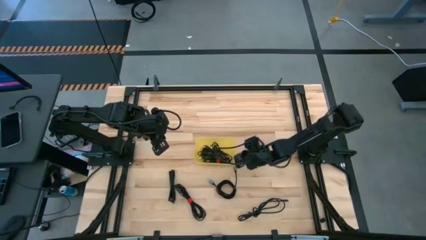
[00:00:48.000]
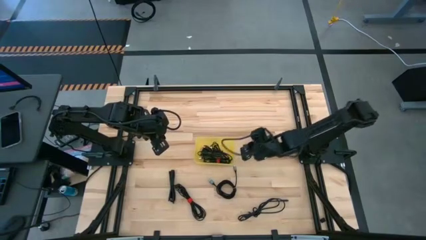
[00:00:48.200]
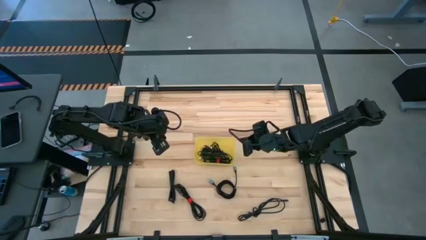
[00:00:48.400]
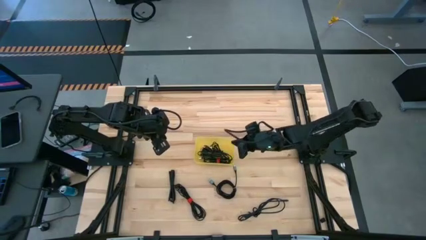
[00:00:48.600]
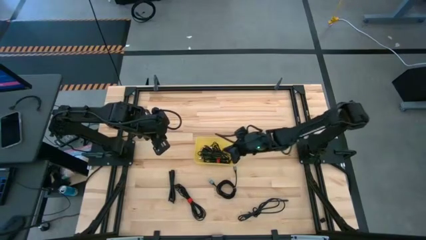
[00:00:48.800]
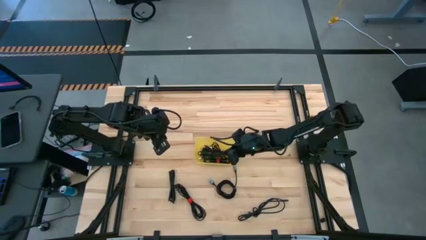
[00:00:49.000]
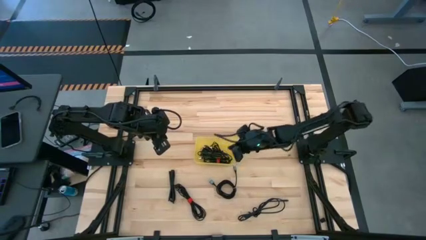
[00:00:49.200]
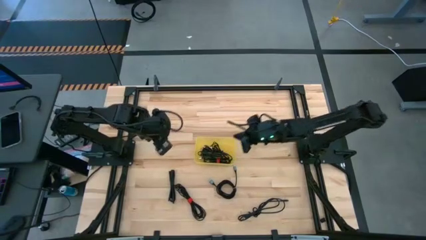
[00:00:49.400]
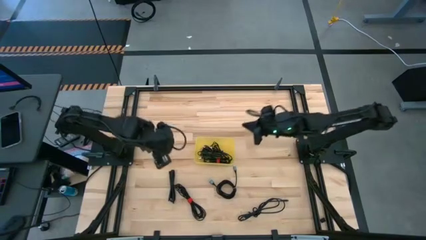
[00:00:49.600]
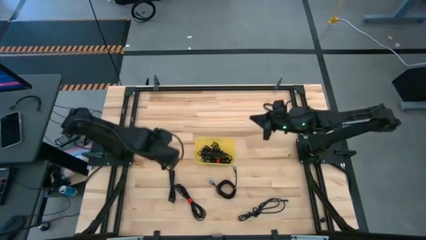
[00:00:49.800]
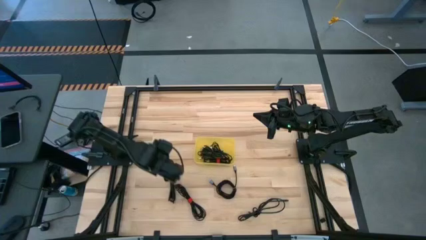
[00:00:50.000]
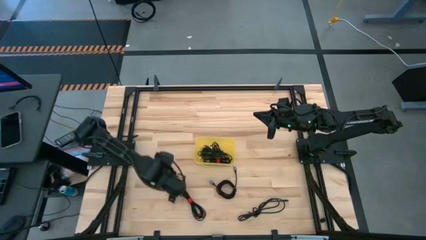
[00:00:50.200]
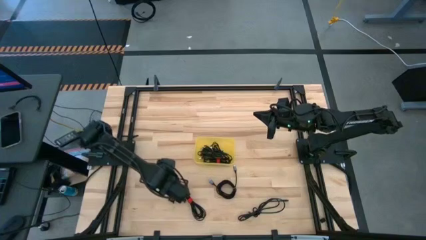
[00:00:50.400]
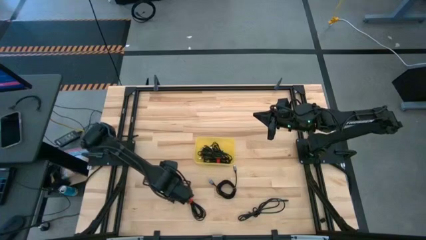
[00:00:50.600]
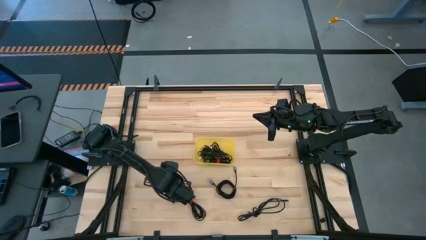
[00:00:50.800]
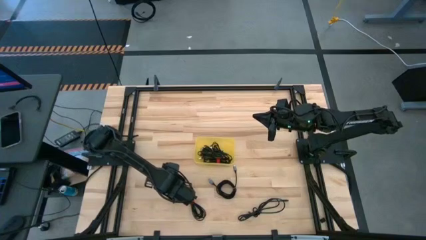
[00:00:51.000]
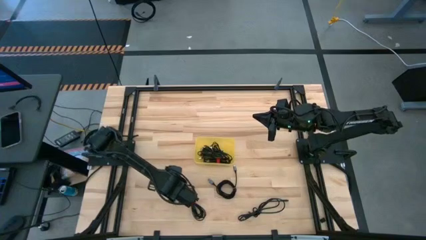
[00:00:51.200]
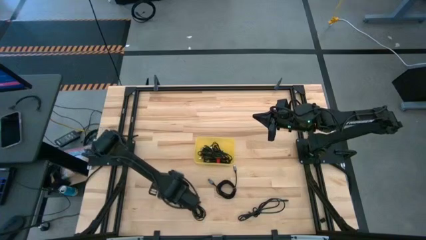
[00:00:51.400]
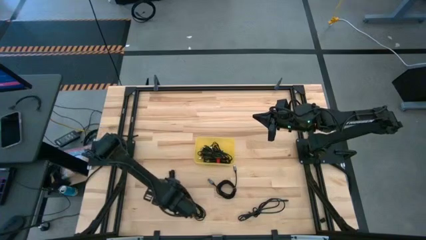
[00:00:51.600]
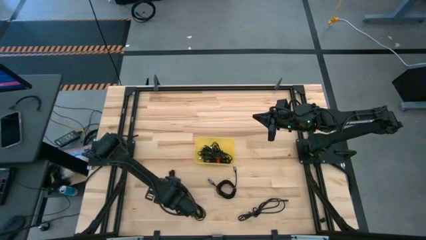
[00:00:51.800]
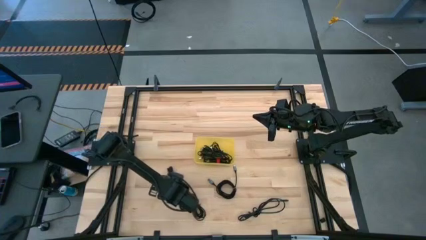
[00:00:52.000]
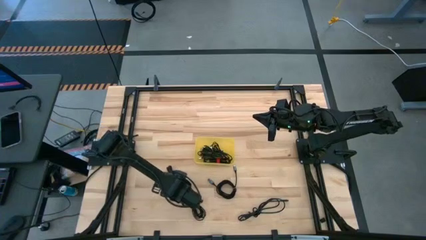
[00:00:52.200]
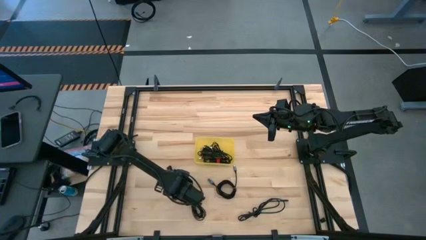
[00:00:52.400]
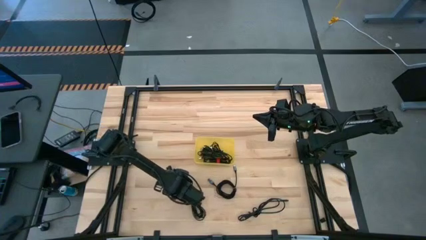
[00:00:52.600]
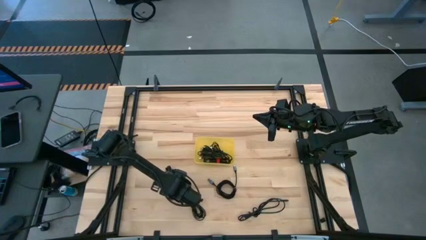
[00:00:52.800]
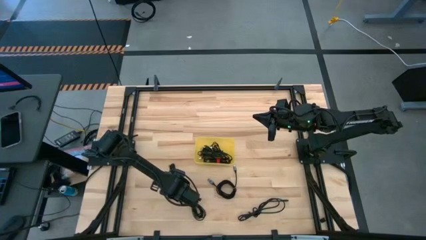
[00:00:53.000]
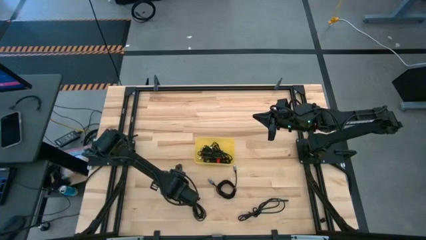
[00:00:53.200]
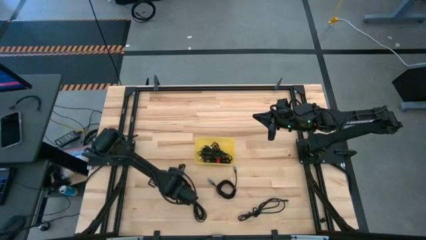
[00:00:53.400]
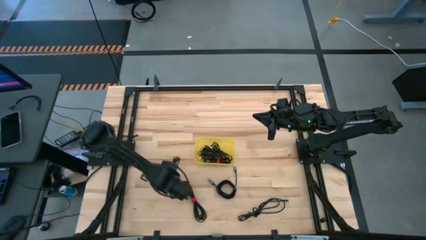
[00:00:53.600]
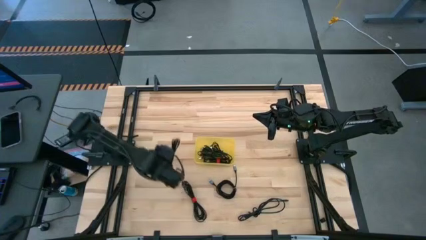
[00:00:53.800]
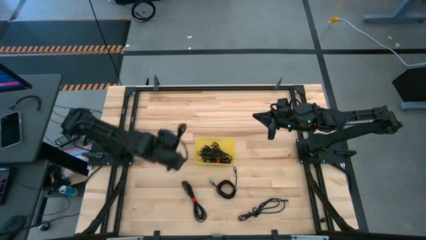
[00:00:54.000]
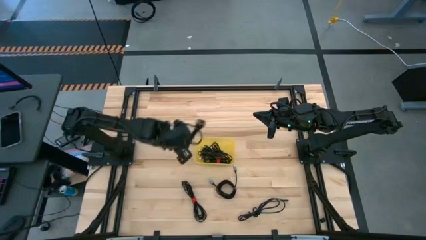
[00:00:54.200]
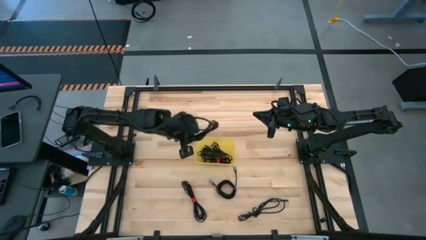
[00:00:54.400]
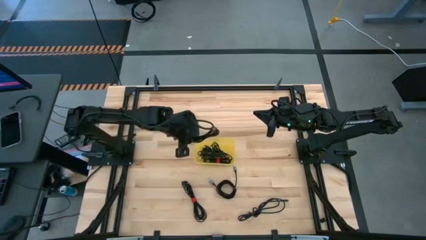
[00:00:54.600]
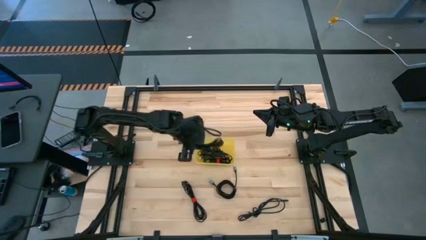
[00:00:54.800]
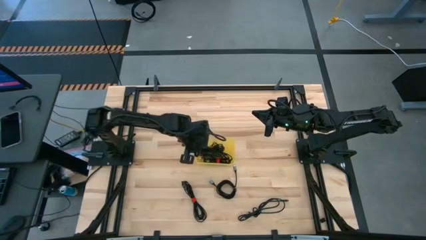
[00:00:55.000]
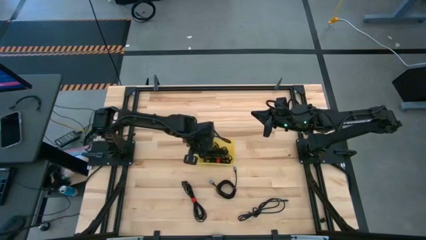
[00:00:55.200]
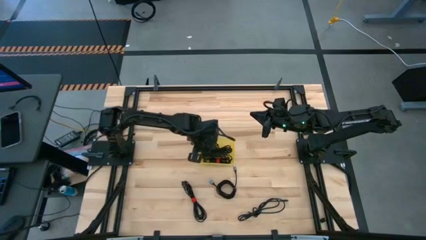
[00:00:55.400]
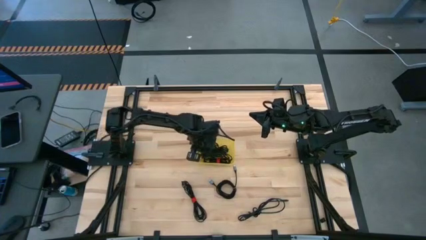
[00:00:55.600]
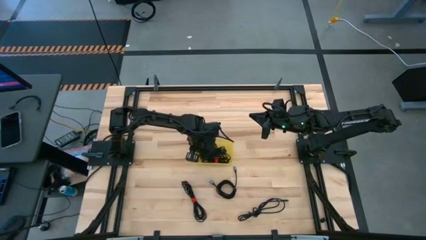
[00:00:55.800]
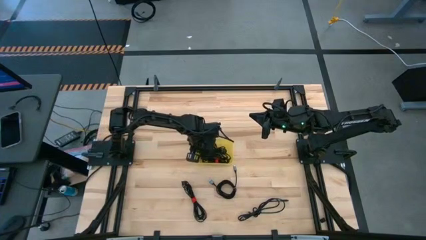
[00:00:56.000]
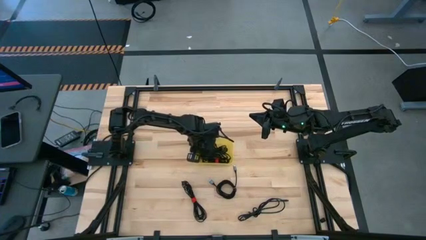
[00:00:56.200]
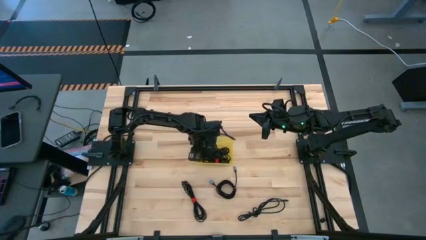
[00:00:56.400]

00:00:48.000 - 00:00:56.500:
Task: Pick and place USB-C Cables
Put the black charger cable into the yellow bin

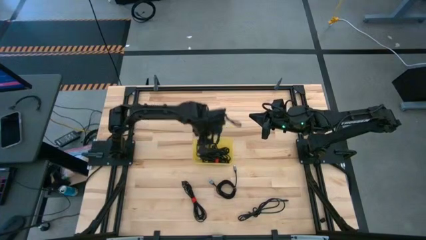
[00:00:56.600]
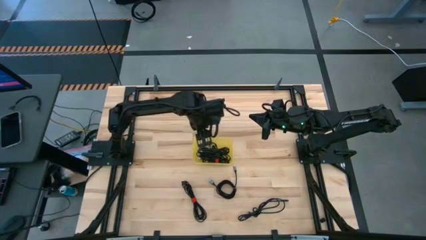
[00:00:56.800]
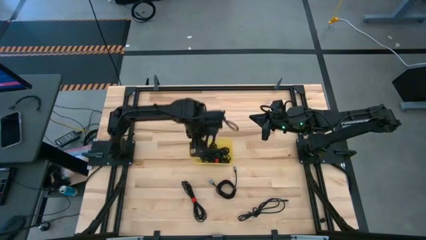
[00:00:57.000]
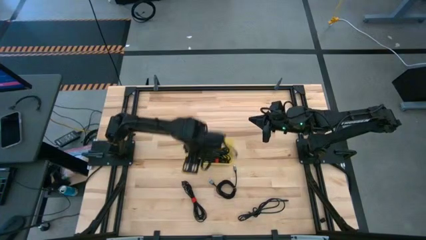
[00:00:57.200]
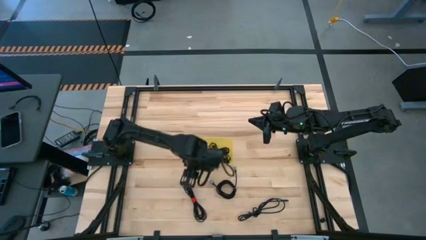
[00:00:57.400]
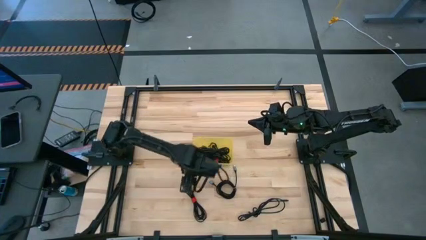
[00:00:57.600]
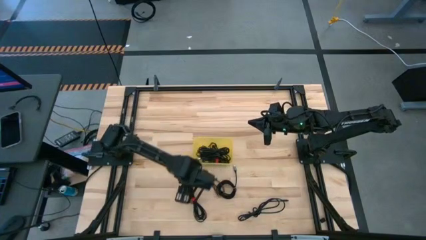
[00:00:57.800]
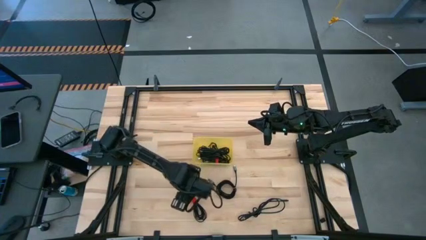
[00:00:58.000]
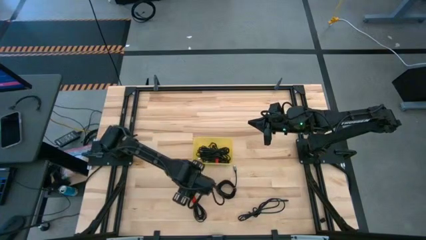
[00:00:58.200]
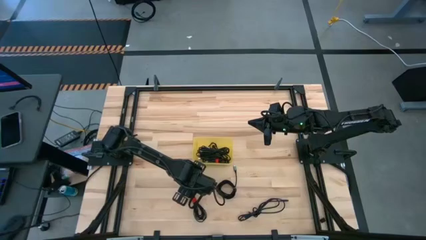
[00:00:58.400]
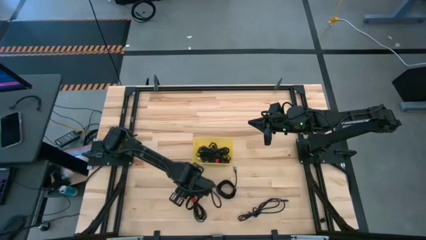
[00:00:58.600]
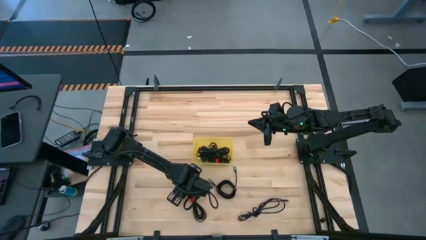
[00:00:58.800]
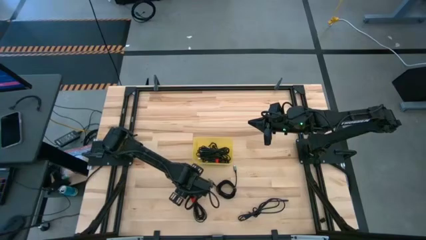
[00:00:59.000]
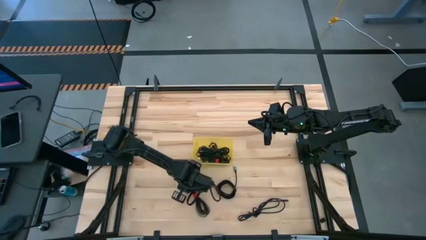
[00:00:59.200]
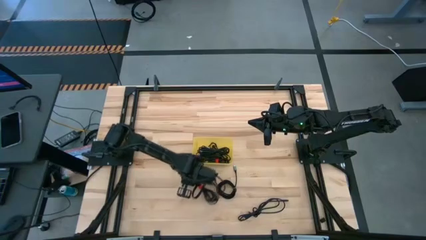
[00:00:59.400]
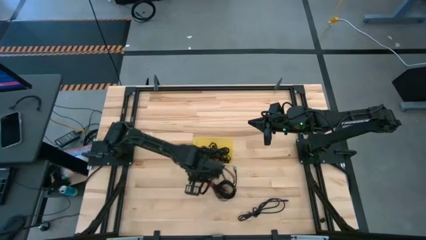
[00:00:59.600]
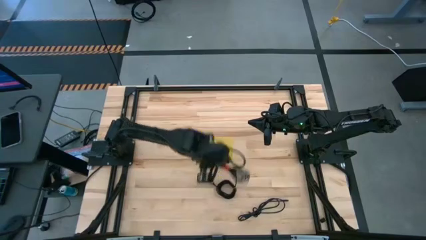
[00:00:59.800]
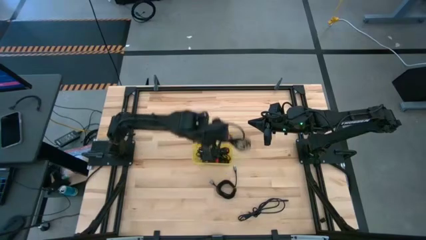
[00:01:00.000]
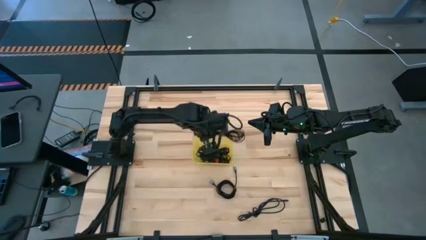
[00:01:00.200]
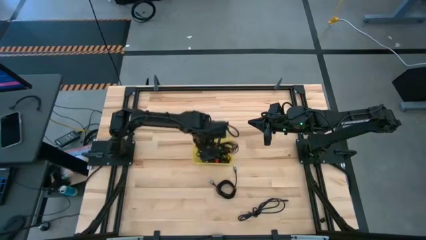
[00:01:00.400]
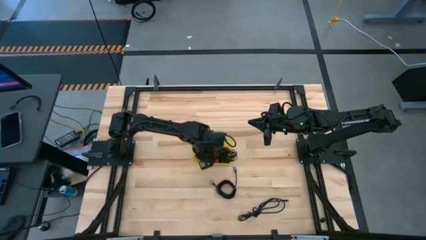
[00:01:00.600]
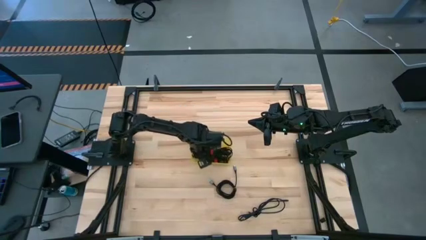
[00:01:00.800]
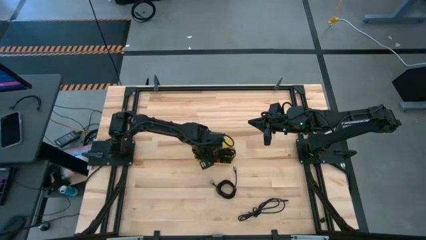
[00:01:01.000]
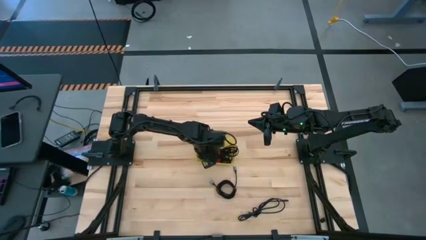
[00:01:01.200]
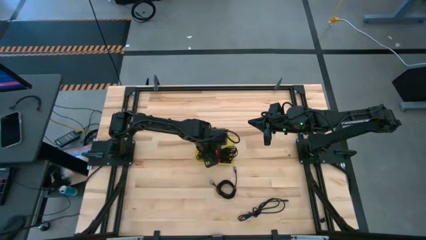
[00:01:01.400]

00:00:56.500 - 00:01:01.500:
Put the black charger cable into the yellow bin

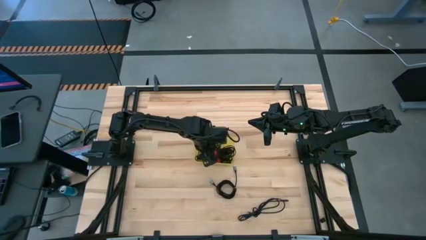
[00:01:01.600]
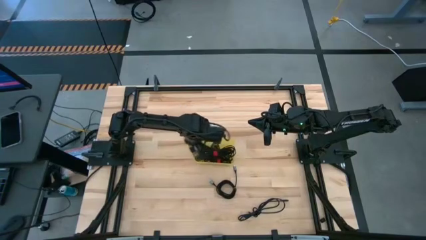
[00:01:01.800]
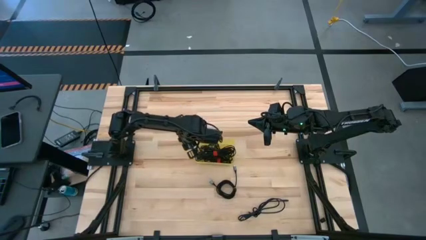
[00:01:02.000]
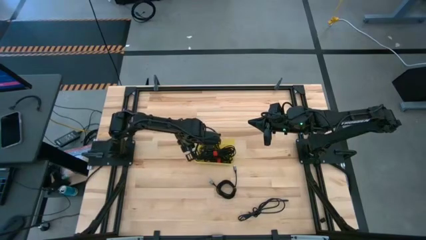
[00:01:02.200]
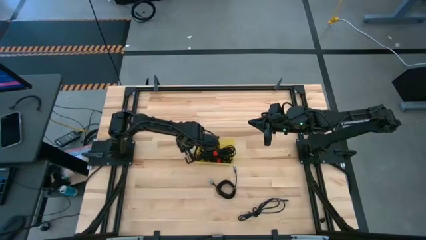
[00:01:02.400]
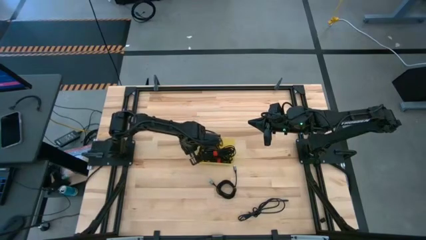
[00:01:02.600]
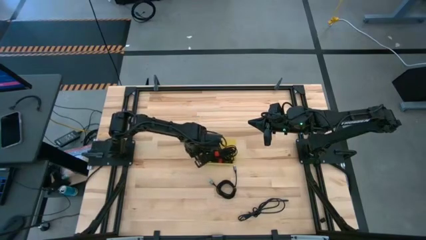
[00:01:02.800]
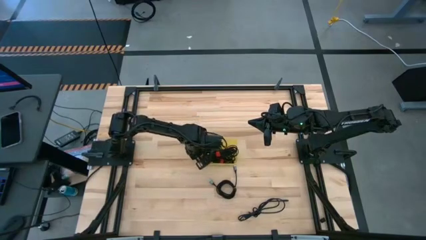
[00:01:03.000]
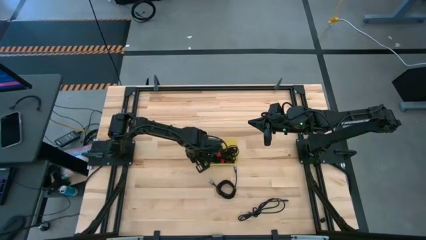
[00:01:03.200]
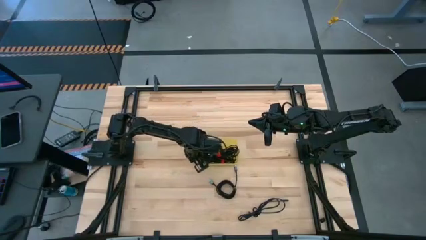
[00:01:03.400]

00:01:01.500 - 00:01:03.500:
Adjust the yellow bin
